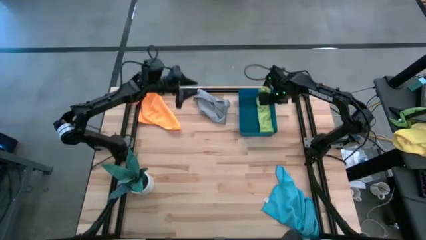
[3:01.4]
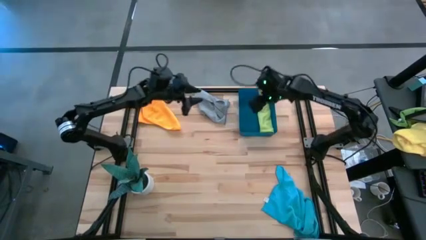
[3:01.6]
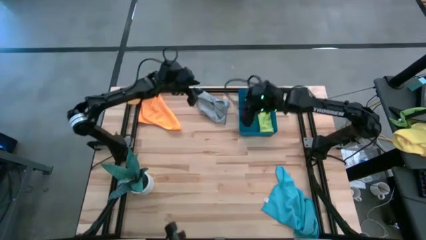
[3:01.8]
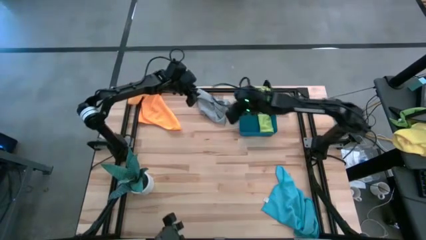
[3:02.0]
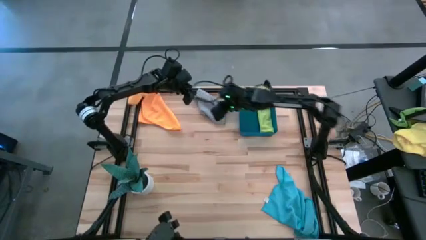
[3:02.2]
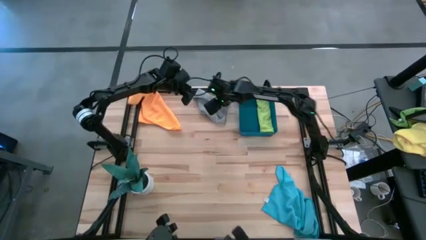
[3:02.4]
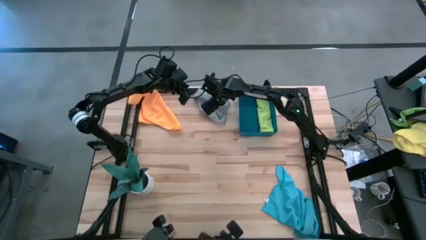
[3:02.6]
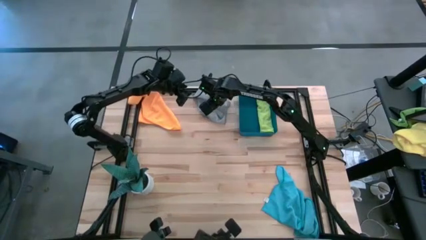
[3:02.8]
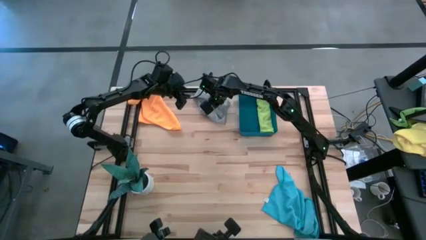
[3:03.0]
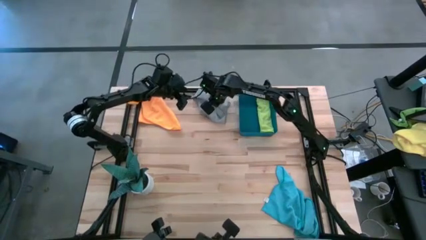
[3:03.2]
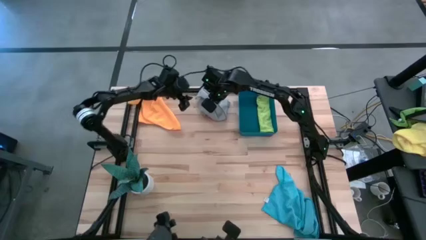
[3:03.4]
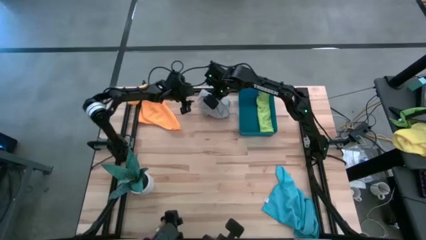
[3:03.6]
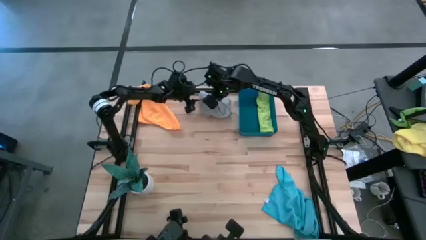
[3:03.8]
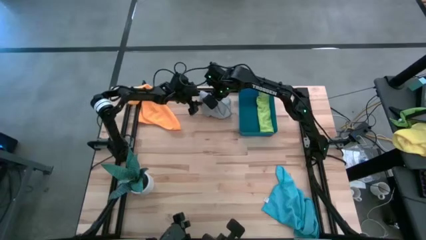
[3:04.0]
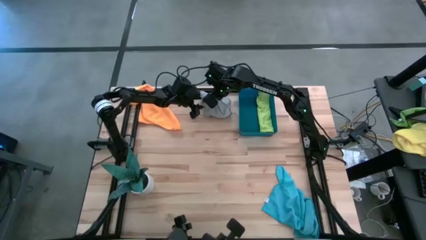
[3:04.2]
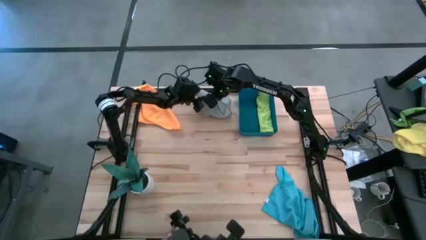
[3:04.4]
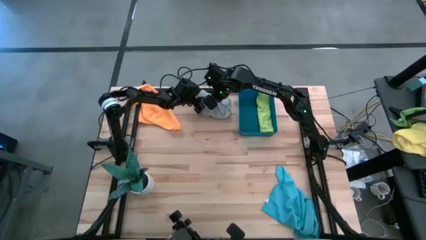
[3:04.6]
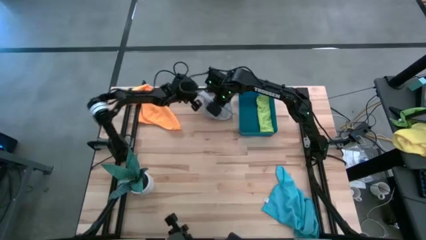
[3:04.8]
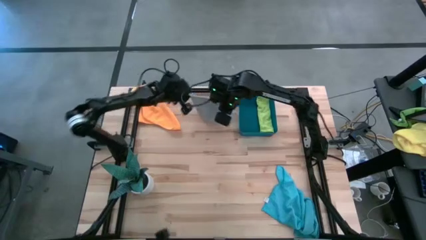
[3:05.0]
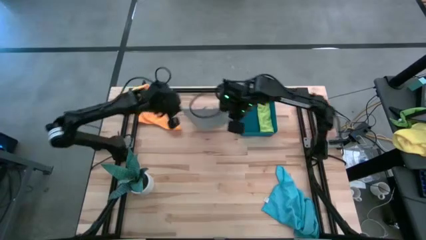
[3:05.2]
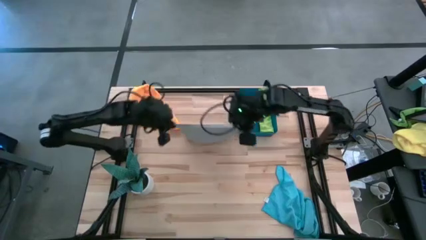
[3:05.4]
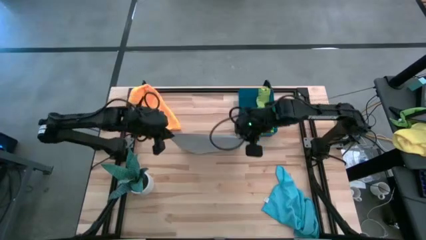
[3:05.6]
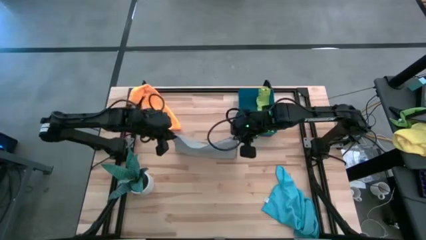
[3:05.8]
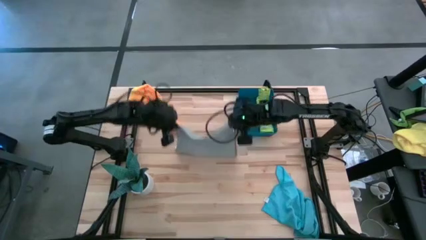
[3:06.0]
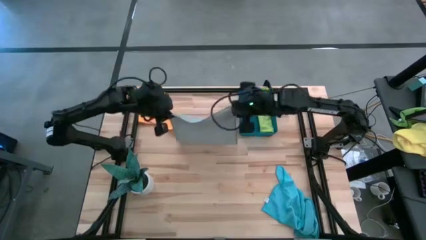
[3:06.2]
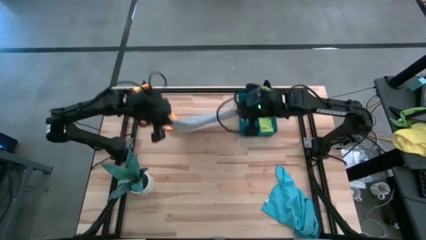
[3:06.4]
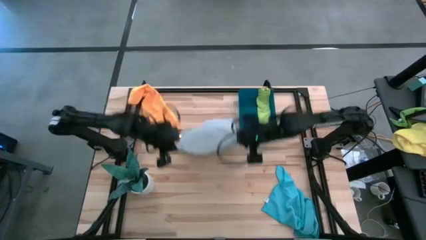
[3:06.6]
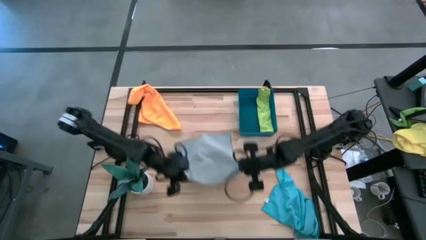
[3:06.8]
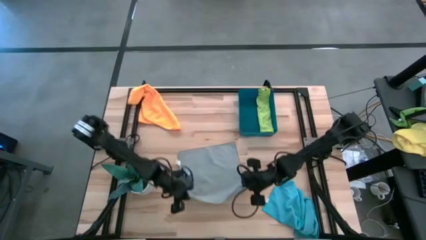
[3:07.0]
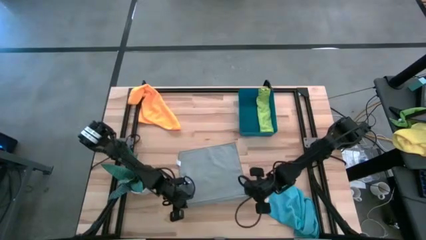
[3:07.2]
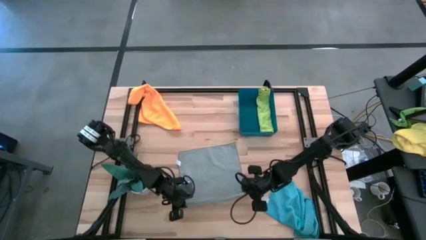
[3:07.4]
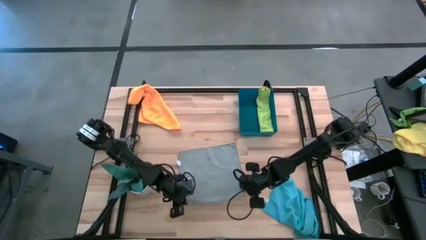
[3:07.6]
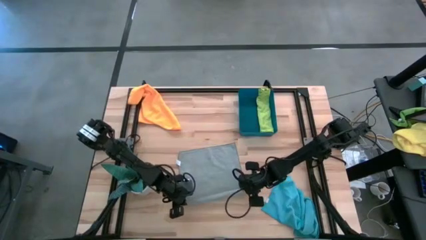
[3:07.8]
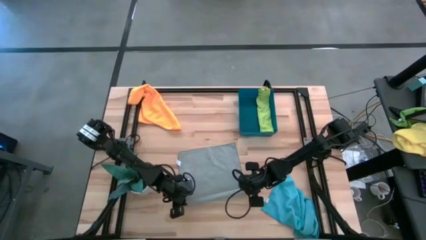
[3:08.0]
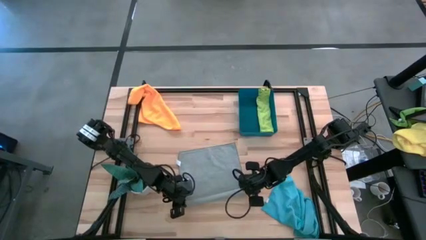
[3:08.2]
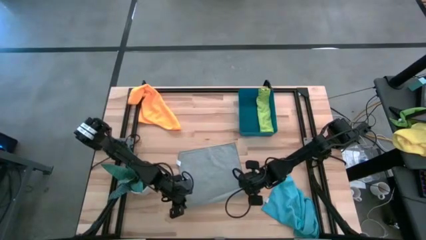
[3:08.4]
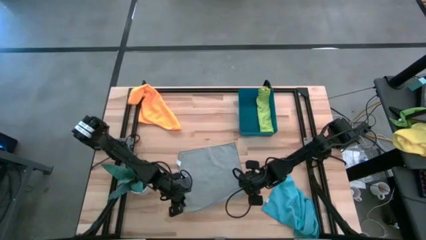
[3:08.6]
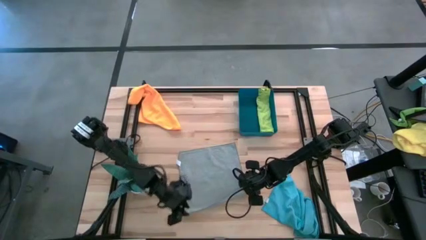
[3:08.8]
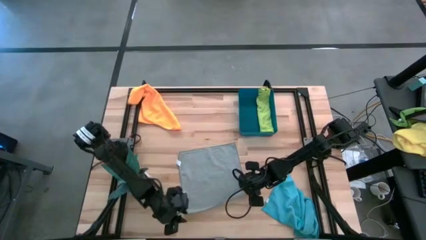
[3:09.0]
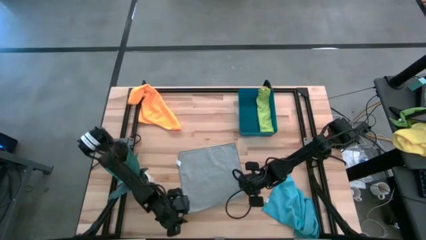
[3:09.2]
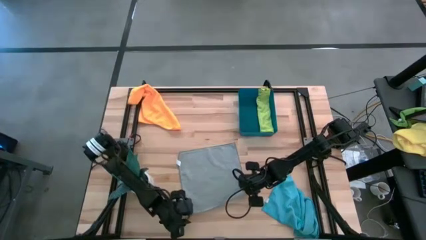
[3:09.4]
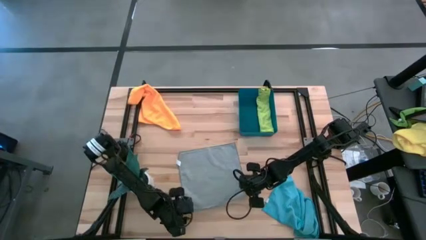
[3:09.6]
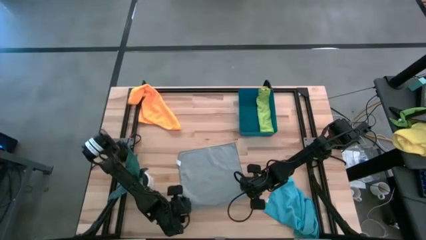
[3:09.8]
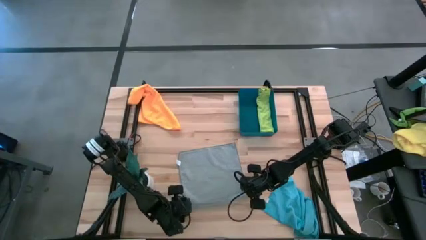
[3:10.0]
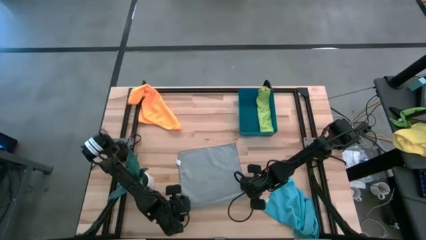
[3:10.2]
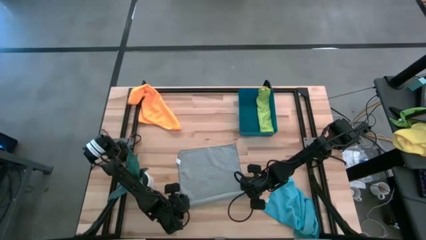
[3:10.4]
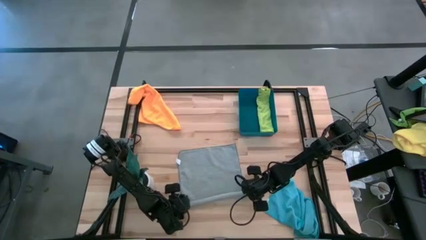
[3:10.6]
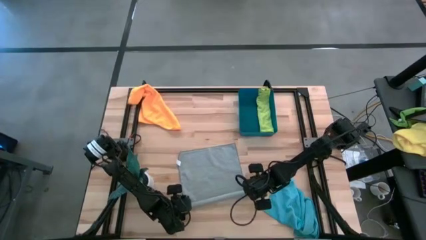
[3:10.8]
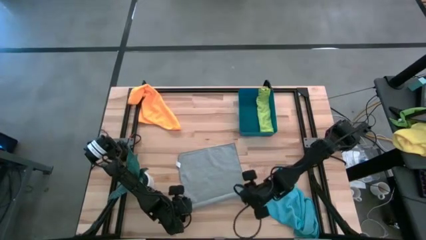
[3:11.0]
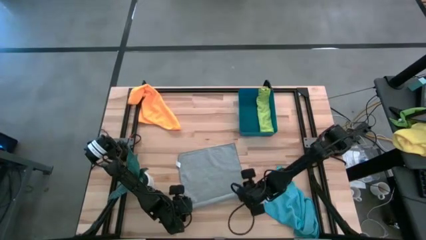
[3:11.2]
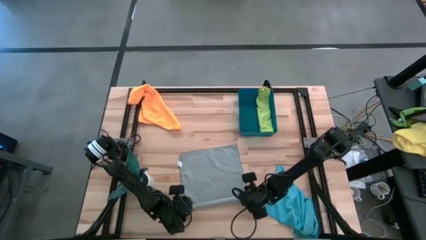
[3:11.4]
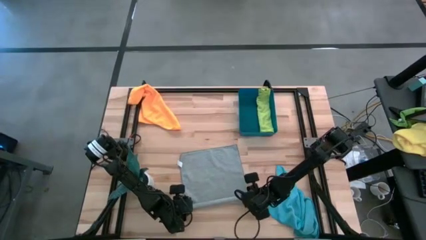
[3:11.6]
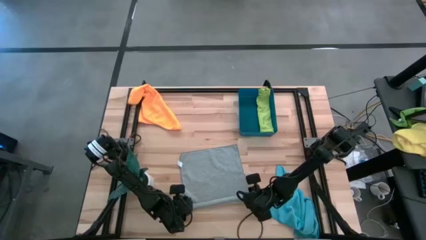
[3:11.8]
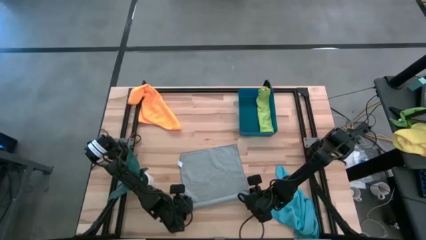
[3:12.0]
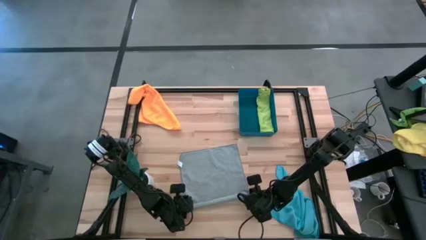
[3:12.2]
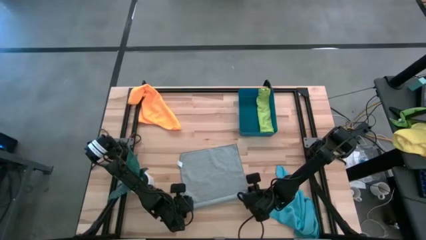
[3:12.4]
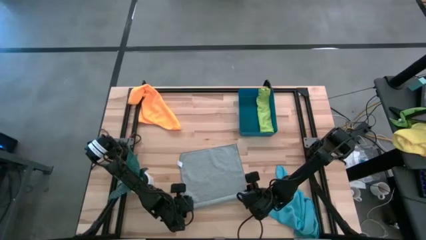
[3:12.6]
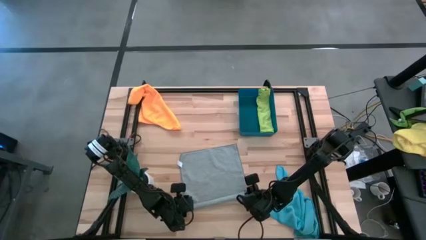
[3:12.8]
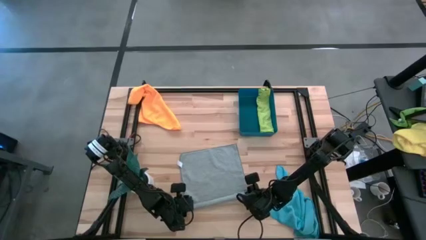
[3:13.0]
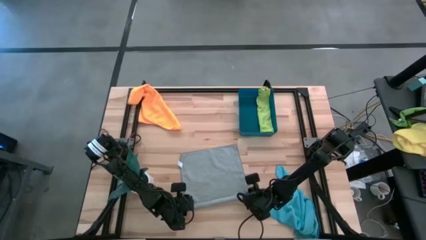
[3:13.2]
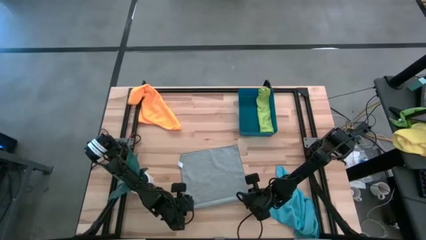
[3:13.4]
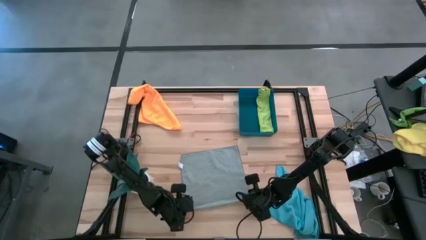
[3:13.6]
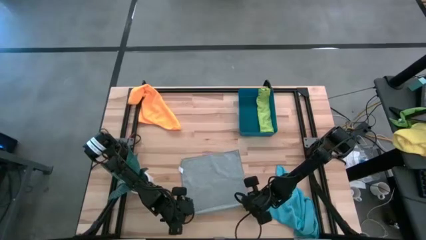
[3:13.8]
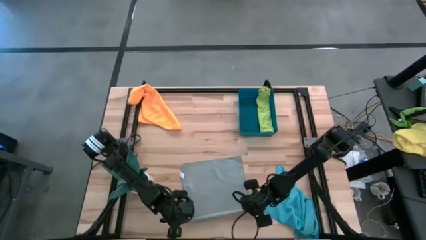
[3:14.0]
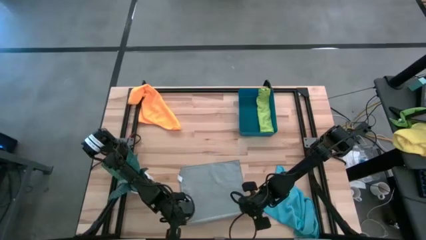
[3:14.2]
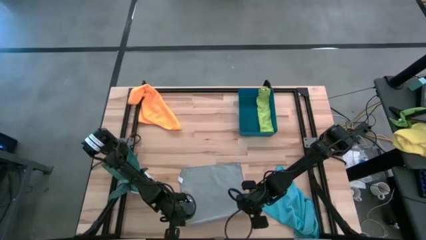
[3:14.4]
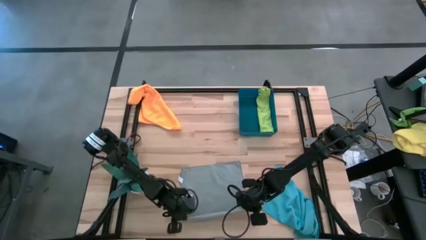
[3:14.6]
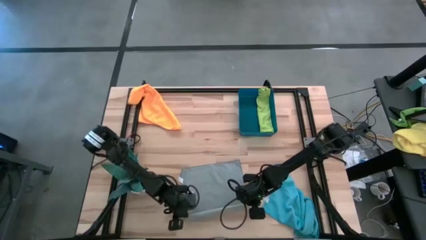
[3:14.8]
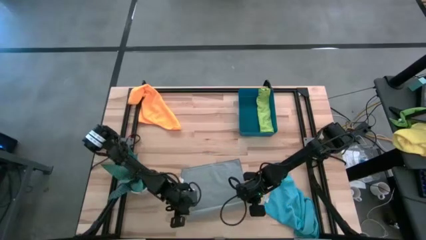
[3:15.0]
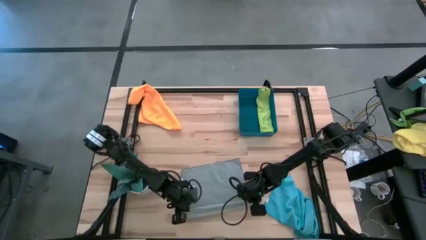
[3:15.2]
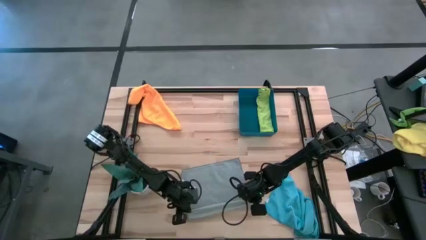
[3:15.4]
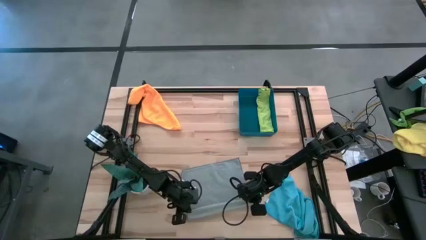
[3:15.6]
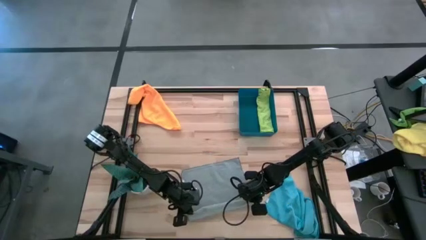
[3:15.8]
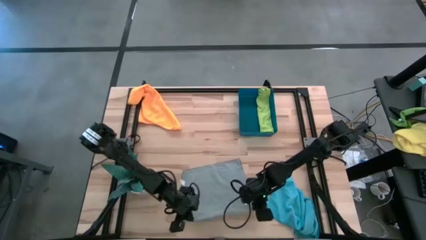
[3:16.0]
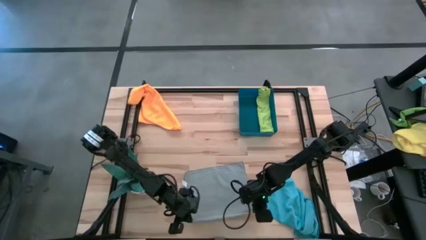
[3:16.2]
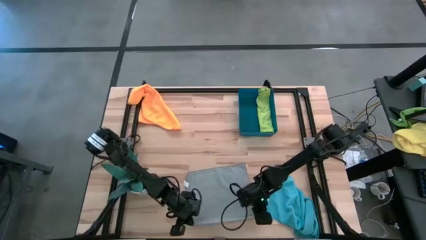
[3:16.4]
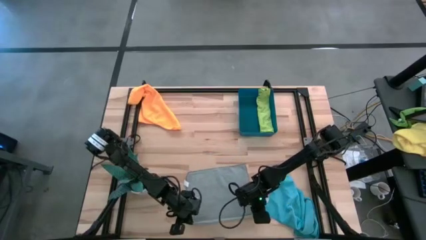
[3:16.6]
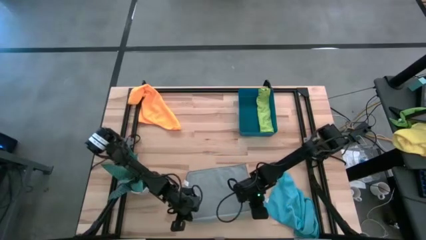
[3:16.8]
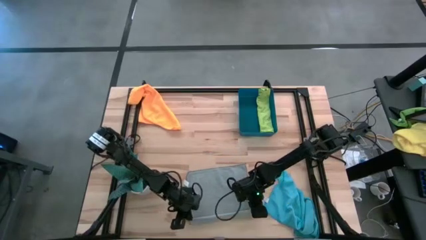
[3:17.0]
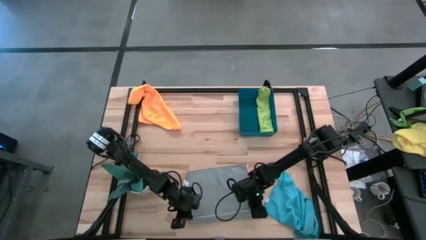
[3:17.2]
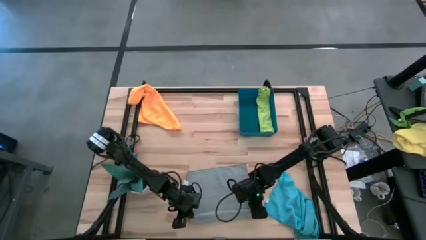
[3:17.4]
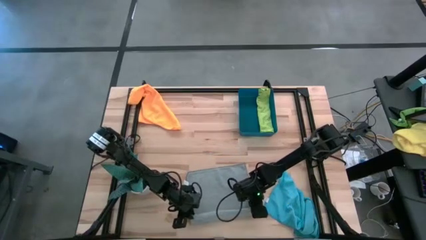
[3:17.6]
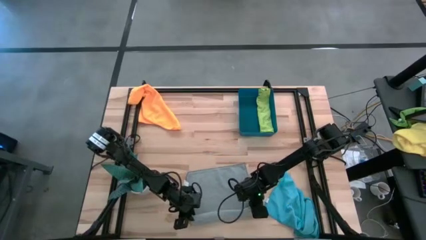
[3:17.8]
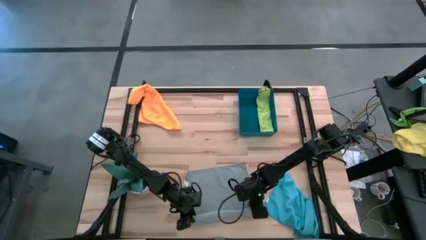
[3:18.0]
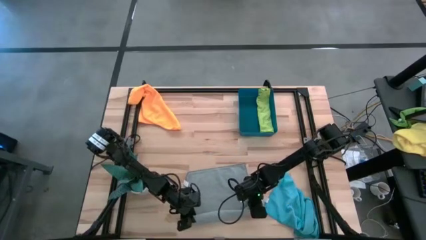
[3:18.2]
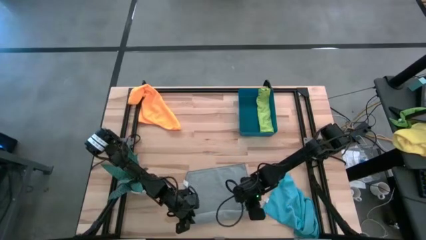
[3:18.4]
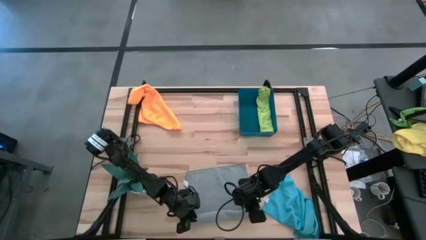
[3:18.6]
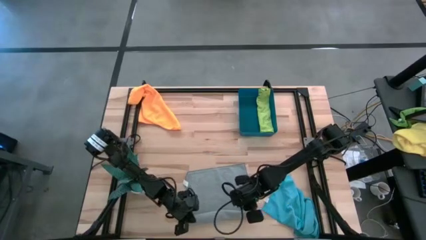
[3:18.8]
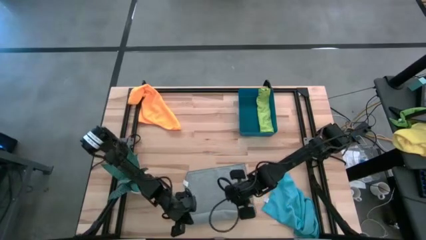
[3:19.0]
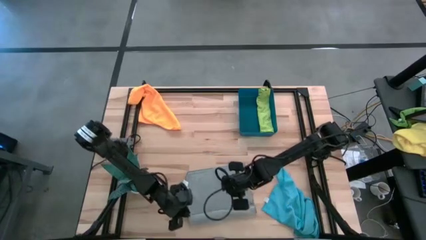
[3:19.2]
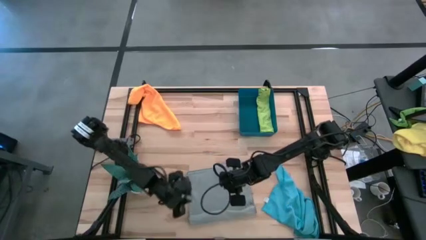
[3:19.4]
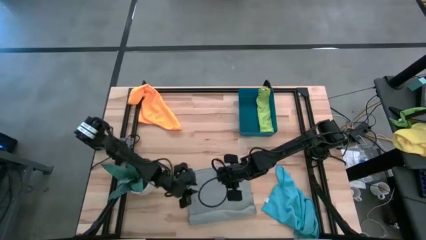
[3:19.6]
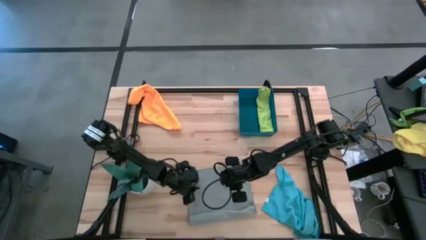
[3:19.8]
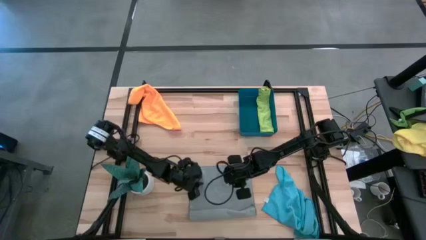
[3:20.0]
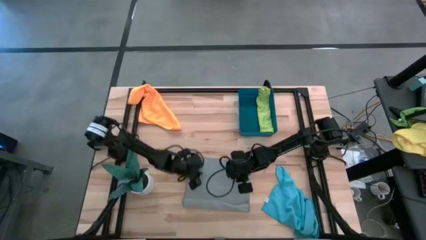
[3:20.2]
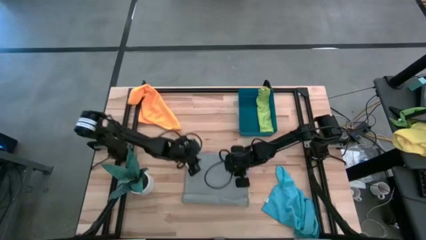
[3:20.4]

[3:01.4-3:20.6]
Task: Roll microfiber towels into tight, uniform cylinder then place into a basket
Roll the gray towel
